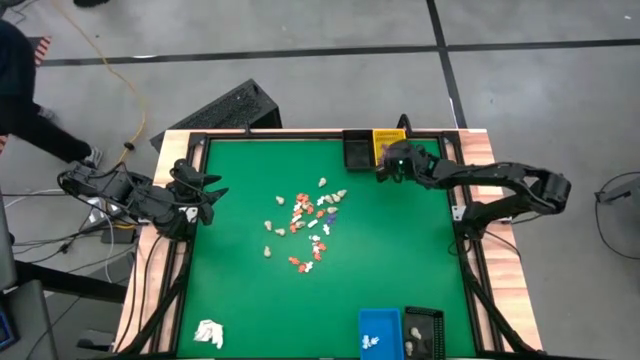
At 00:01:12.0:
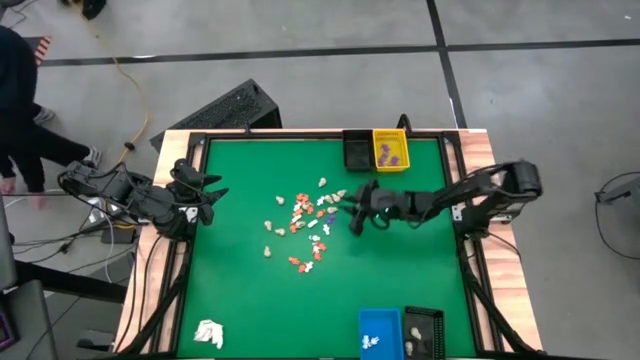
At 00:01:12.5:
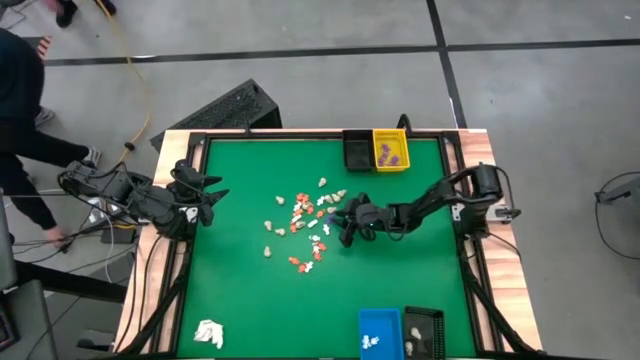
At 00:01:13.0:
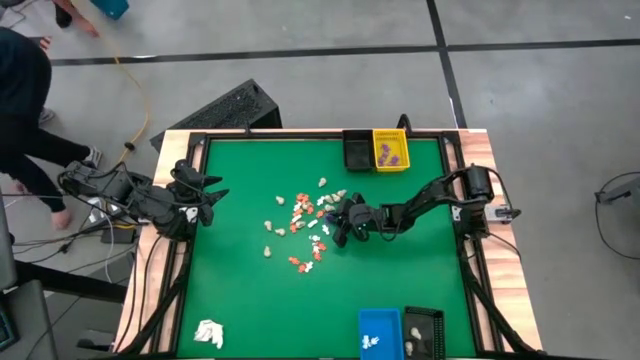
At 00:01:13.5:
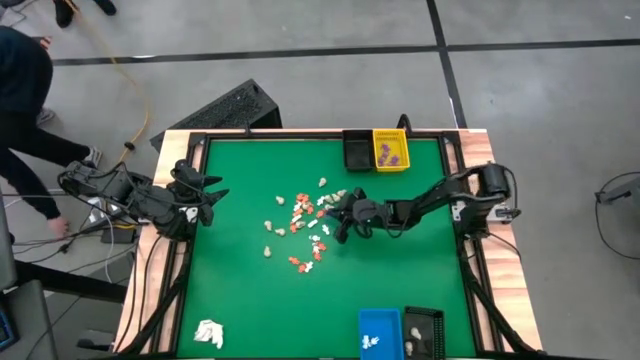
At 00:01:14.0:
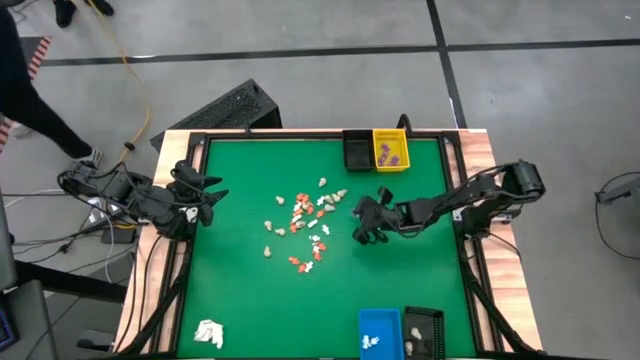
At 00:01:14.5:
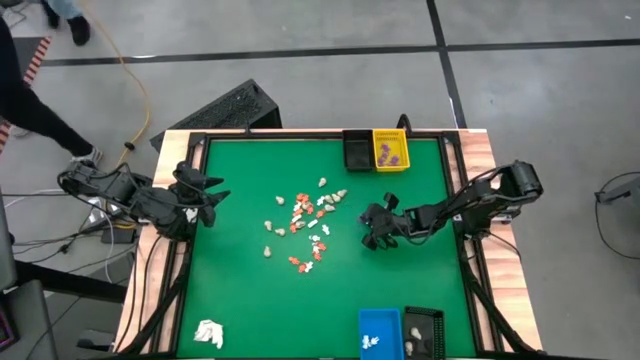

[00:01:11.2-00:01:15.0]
Task: Sort Halloween decoration
Put the violet spider toy into the yellow basket

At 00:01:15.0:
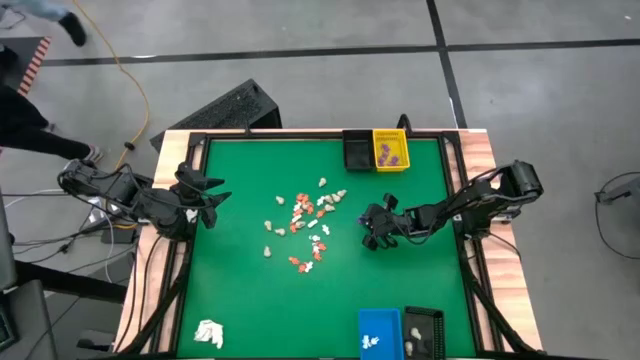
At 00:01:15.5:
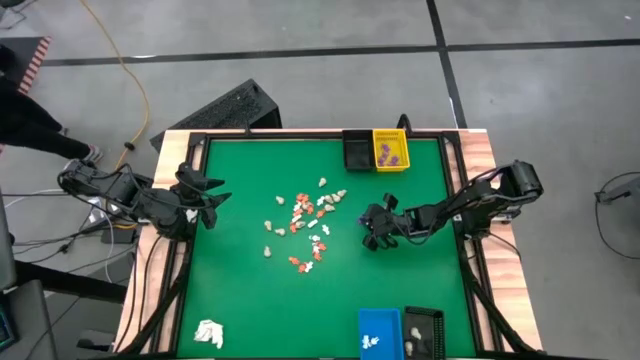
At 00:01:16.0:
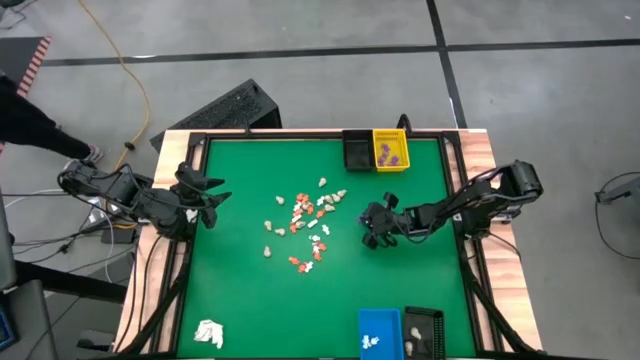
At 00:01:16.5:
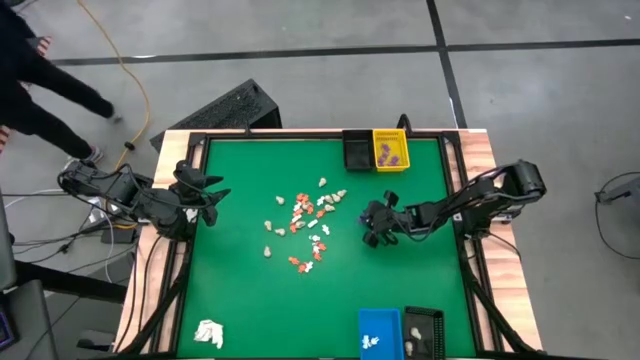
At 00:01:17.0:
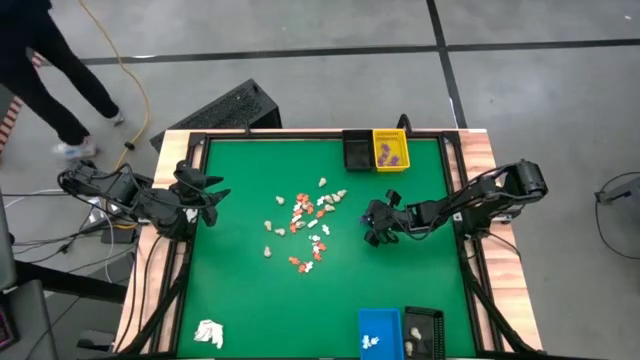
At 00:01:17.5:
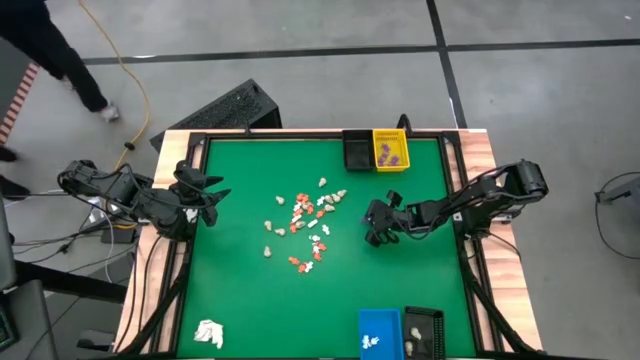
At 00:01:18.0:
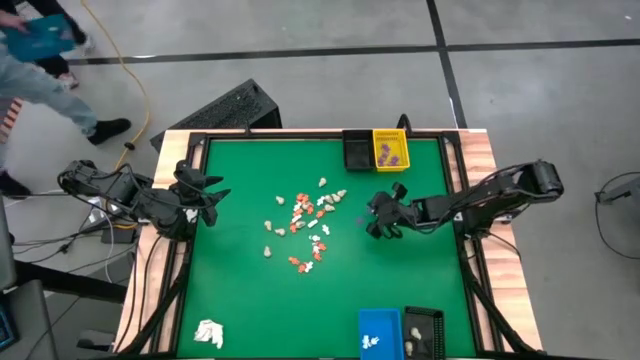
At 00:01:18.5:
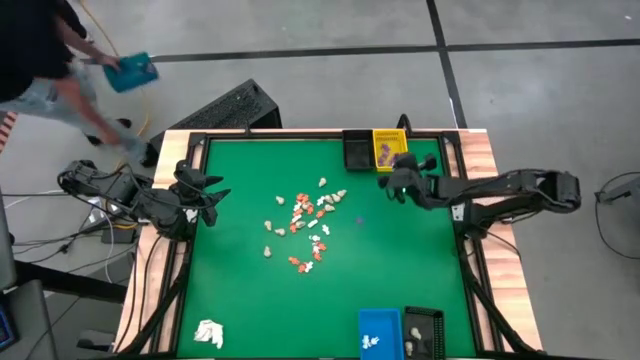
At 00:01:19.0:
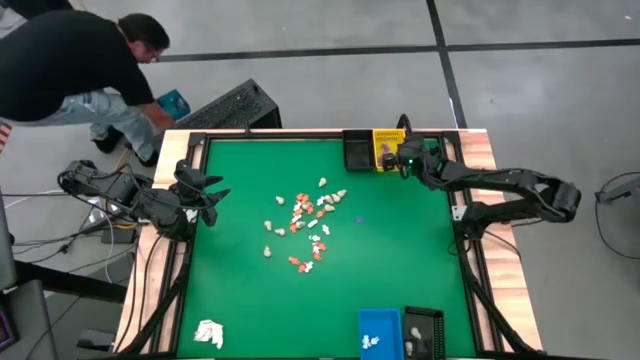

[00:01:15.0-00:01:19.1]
Put the violet spider toy into the yellow basket

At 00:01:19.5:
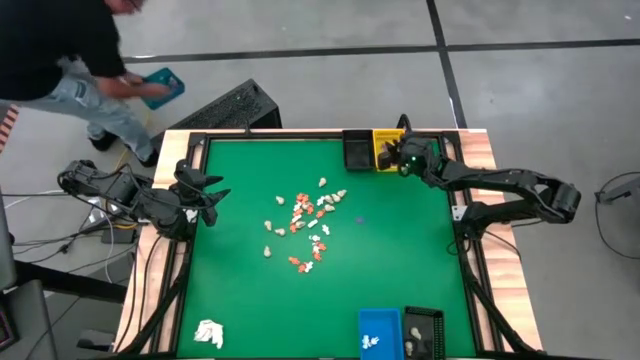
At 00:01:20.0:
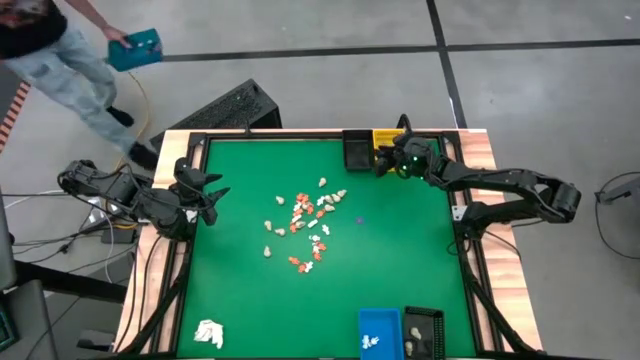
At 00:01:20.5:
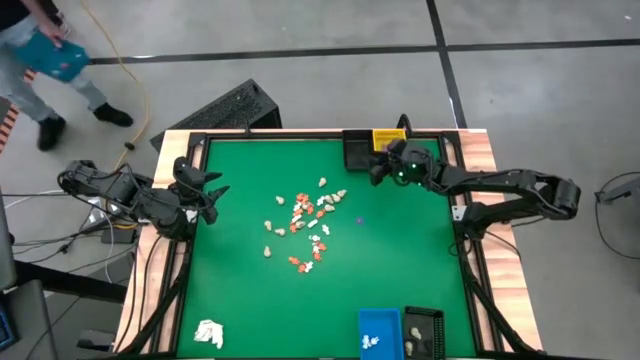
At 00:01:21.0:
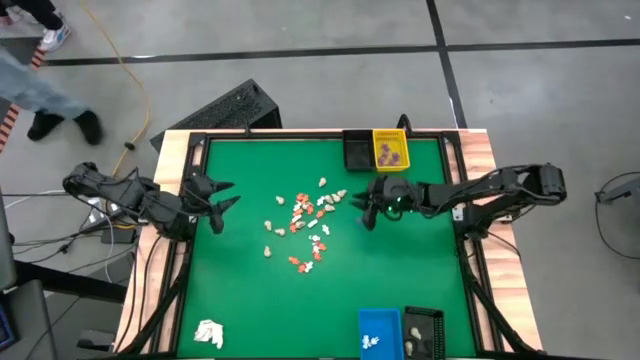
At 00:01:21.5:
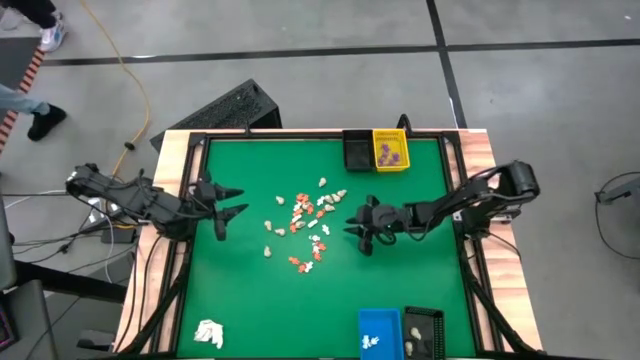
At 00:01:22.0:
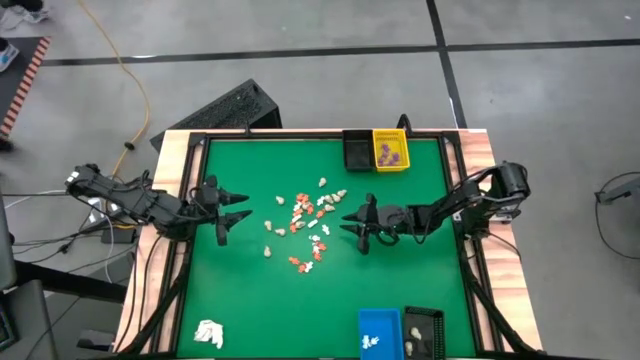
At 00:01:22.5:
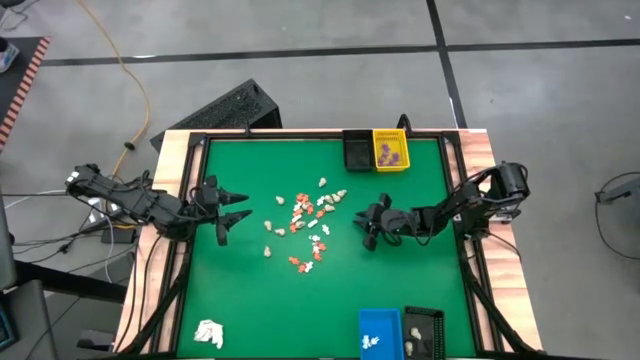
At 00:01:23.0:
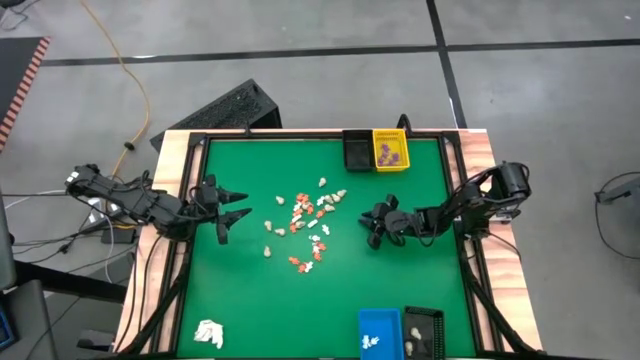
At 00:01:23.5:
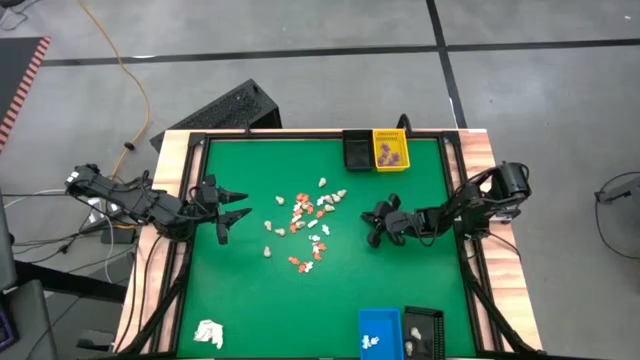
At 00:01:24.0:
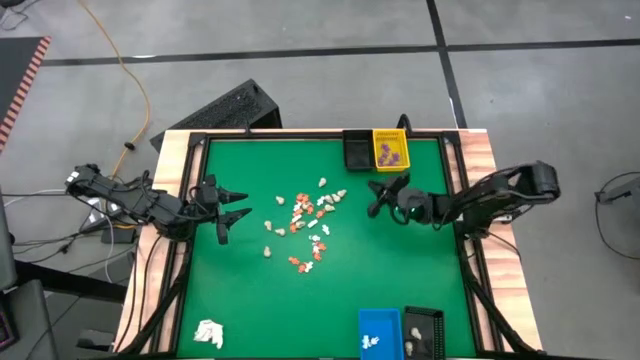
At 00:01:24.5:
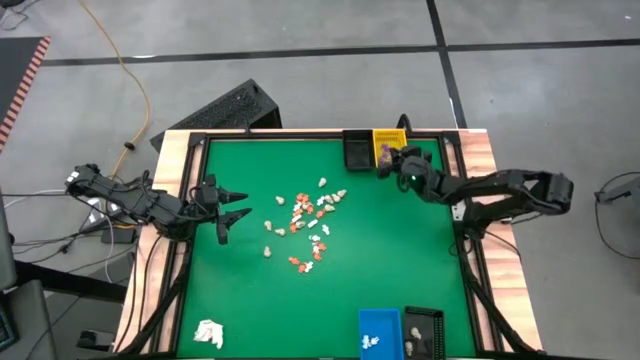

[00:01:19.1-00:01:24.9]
Put the violet spider toy into the yellow basket

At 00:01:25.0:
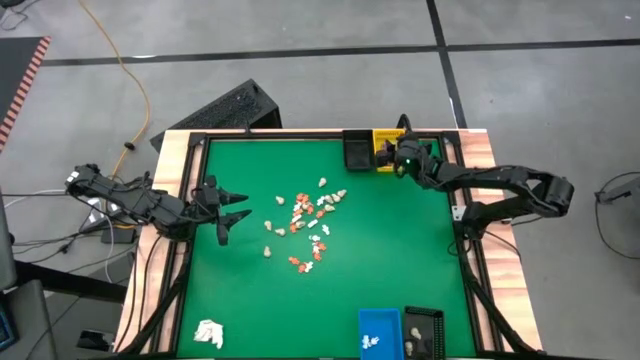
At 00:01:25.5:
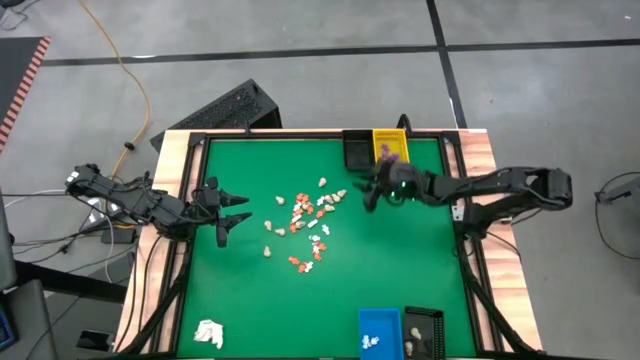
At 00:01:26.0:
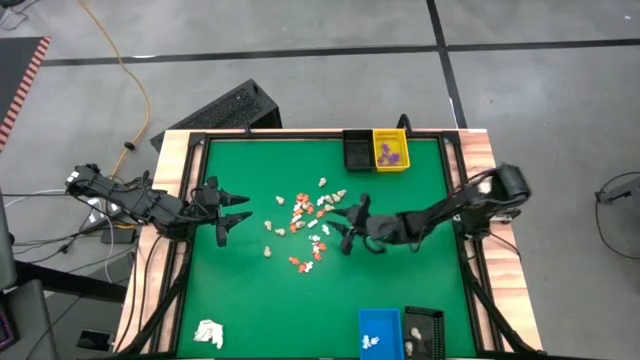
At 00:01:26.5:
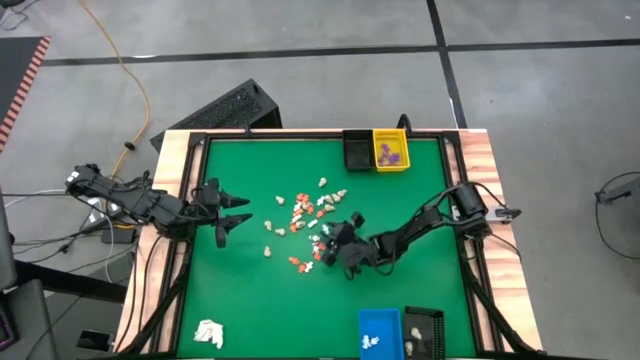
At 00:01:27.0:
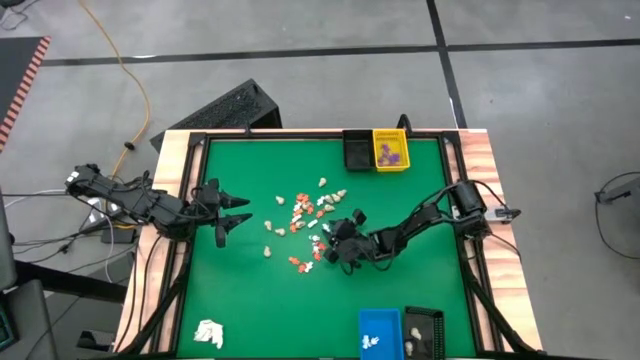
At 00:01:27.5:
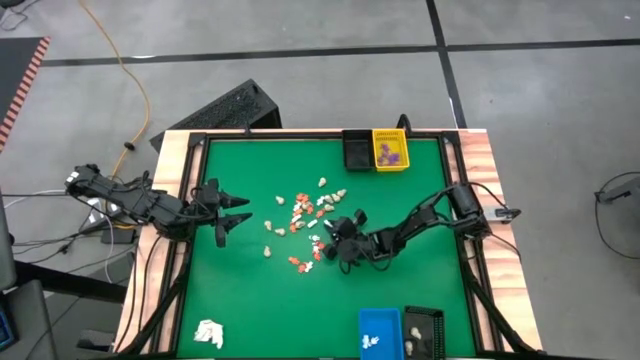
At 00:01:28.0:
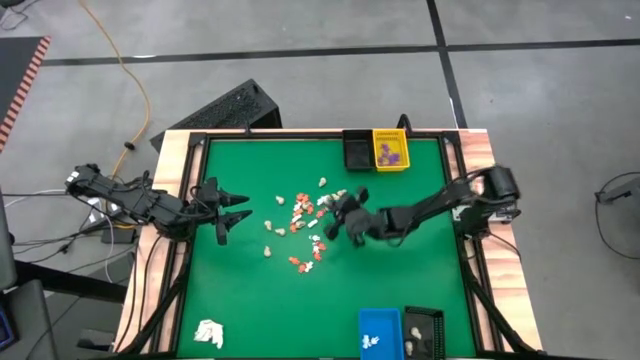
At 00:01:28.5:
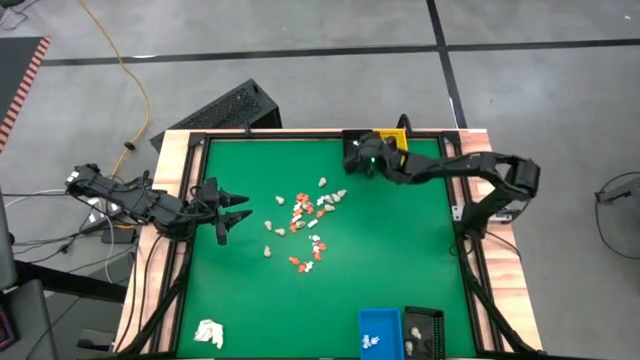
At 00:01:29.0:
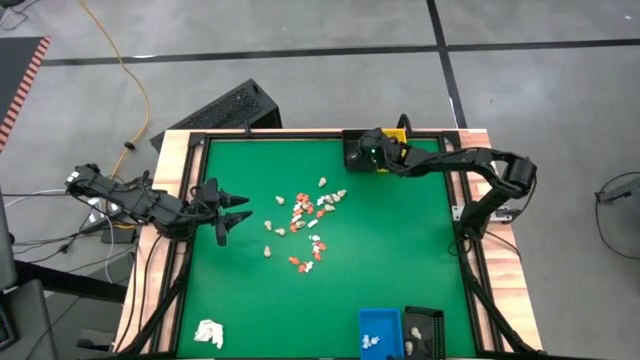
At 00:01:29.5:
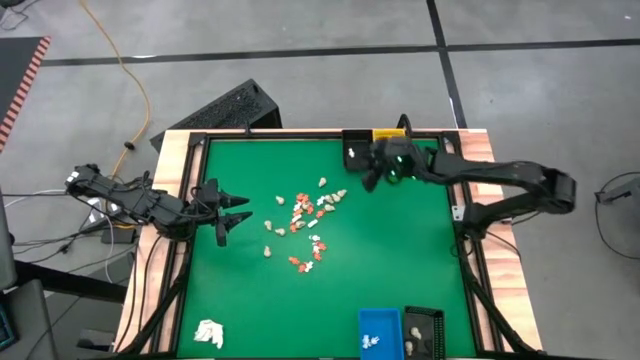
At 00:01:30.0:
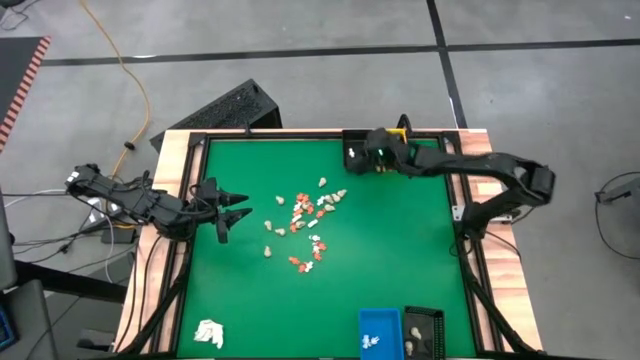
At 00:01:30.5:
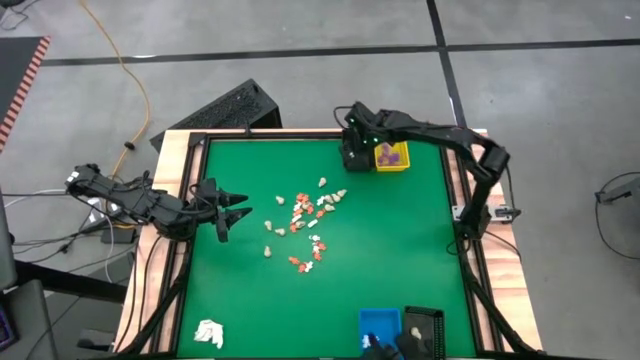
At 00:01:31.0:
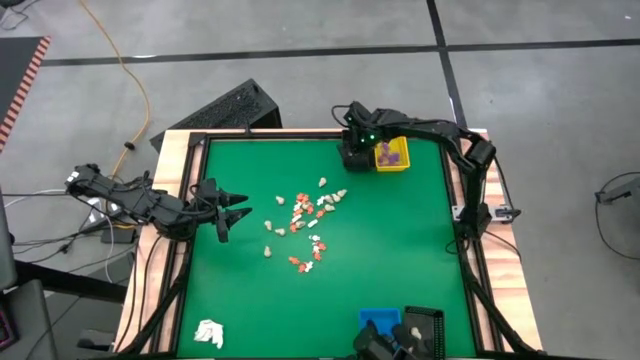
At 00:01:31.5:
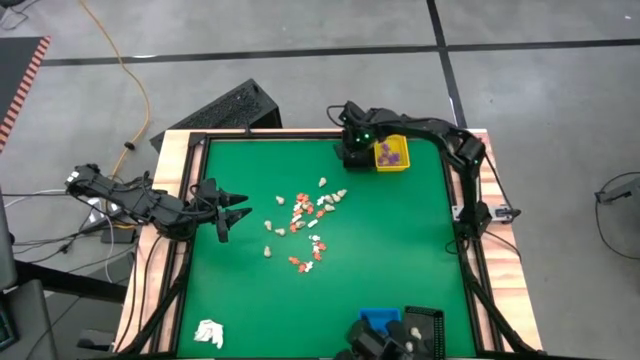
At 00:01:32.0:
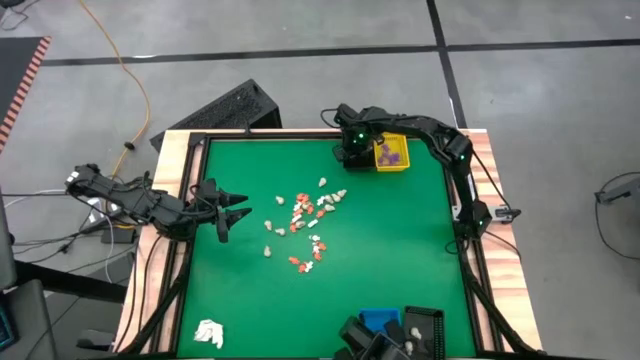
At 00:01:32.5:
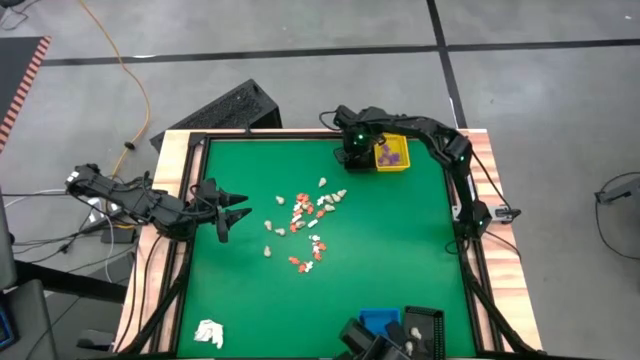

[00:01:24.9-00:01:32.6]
Put the white skeleton toy into the blue basket

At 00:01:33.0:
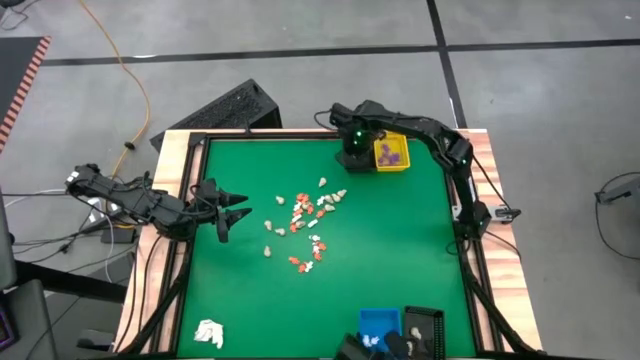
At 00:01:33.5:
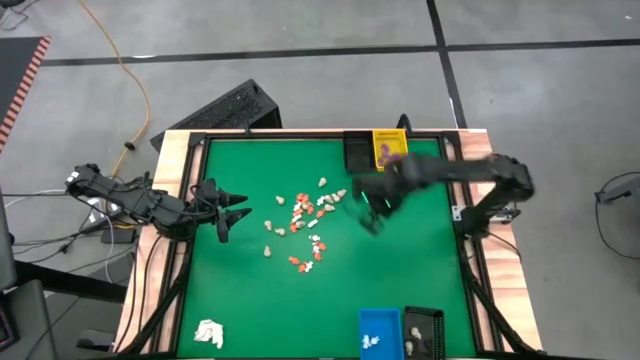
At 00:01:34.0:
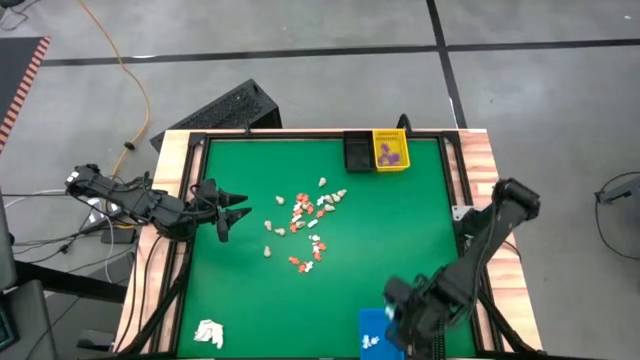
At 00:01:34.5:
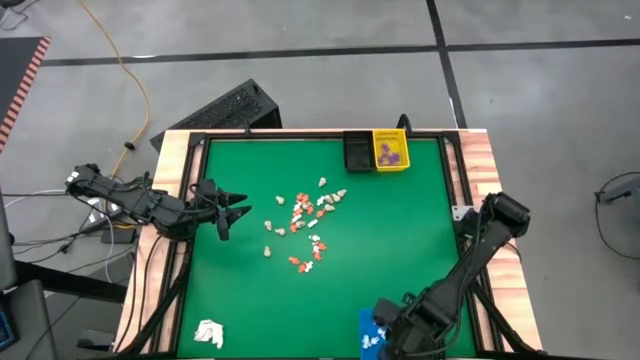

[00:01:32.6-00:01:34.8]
Put the white skeleton toy into the blue basket
